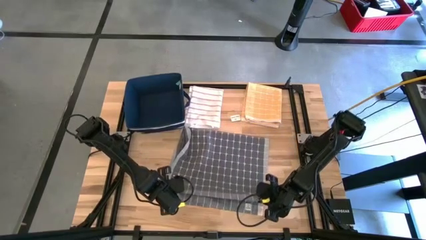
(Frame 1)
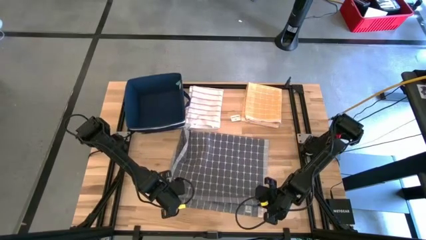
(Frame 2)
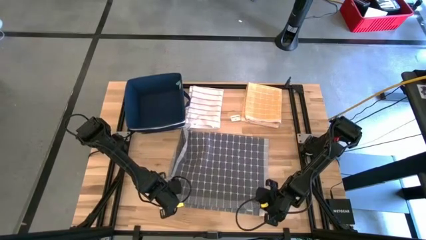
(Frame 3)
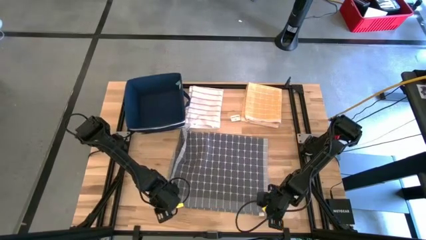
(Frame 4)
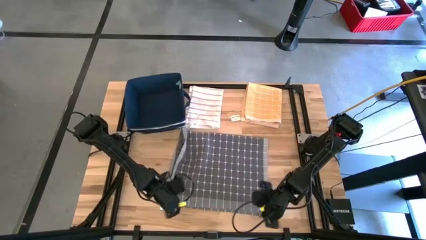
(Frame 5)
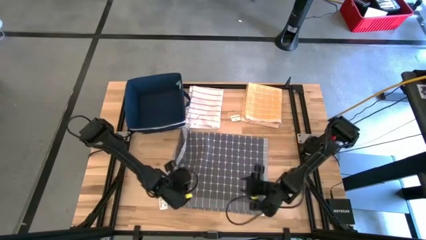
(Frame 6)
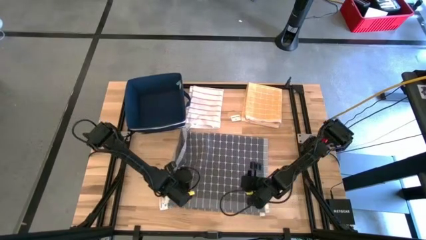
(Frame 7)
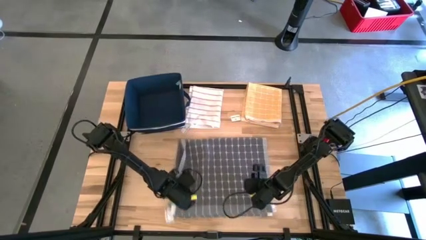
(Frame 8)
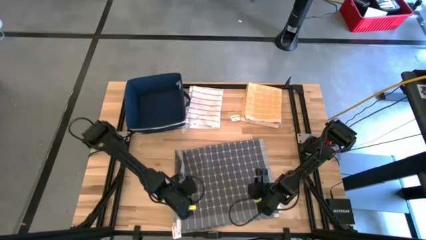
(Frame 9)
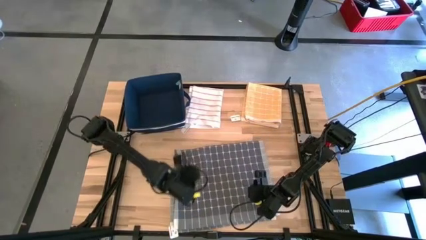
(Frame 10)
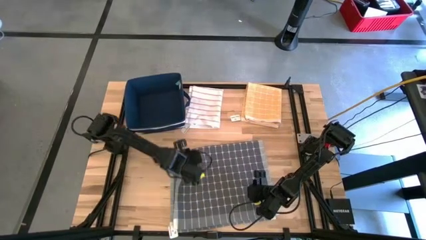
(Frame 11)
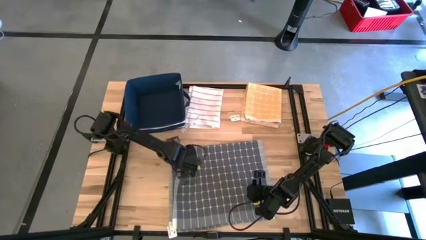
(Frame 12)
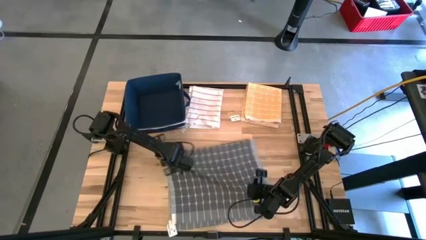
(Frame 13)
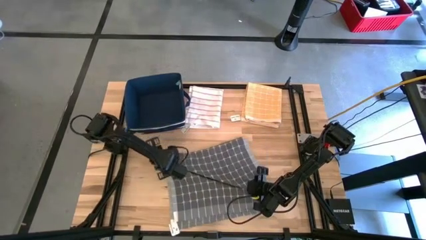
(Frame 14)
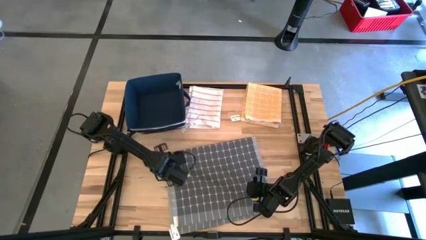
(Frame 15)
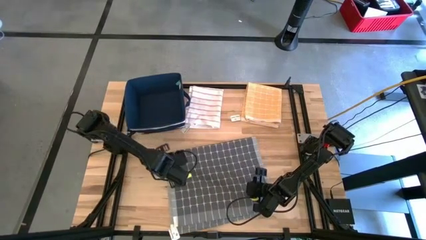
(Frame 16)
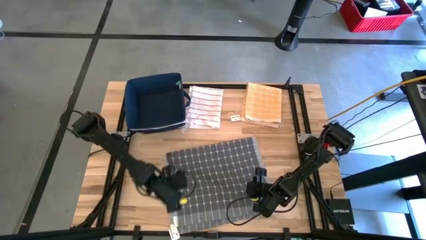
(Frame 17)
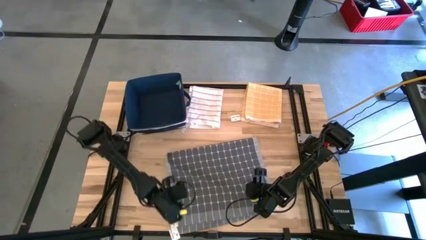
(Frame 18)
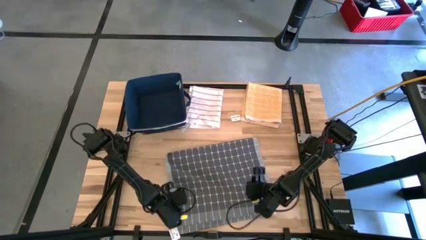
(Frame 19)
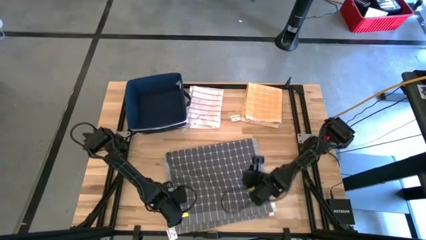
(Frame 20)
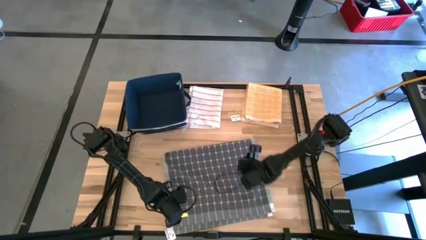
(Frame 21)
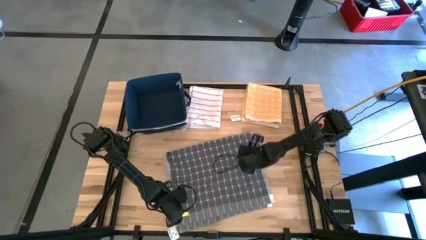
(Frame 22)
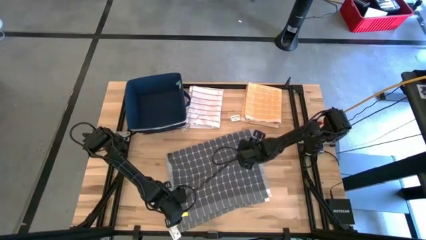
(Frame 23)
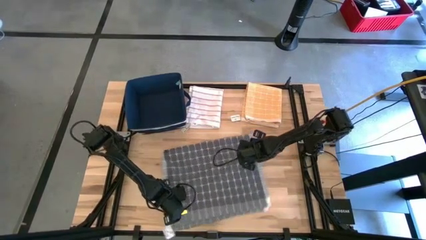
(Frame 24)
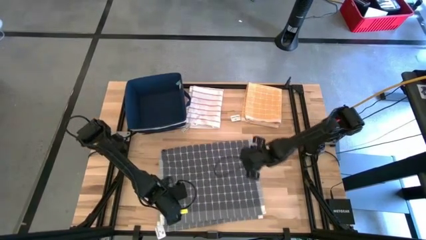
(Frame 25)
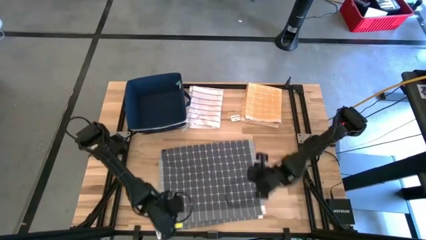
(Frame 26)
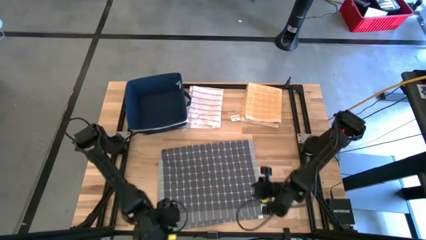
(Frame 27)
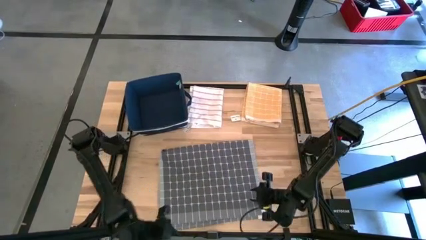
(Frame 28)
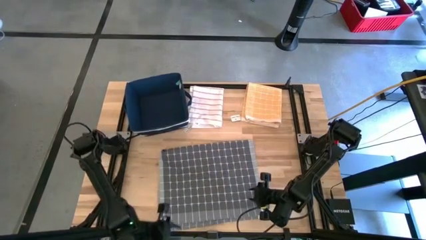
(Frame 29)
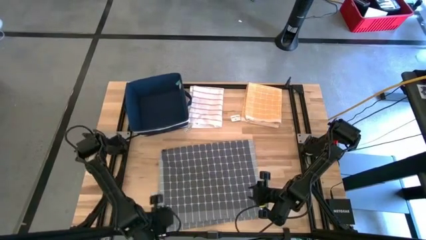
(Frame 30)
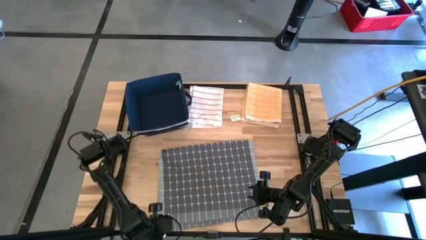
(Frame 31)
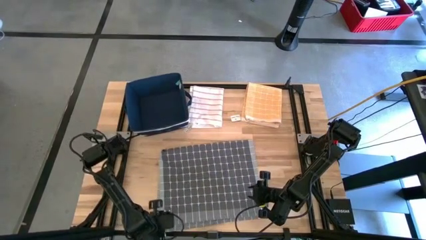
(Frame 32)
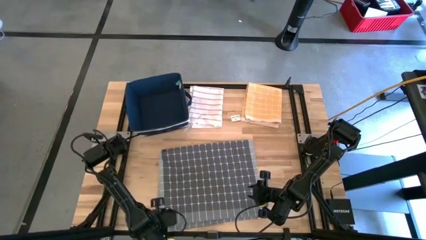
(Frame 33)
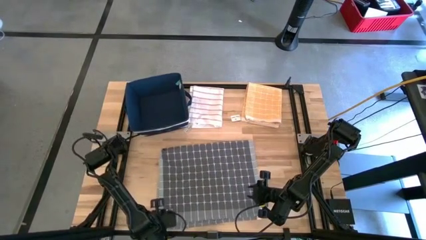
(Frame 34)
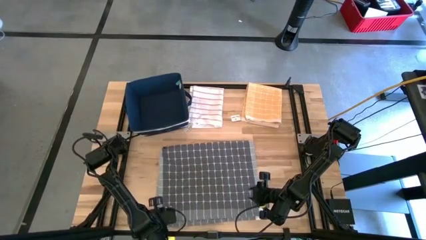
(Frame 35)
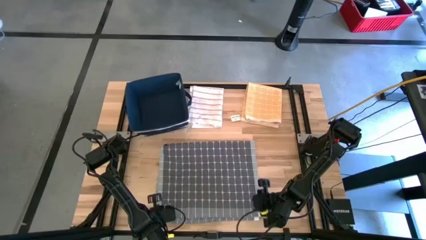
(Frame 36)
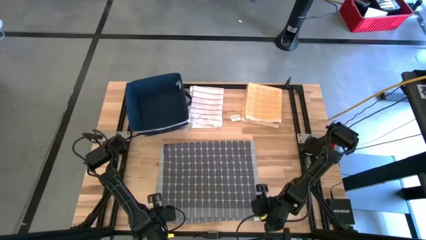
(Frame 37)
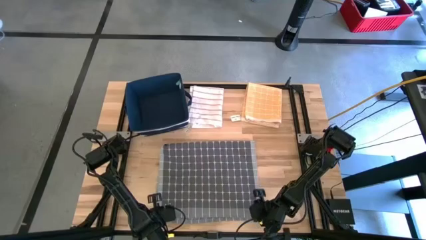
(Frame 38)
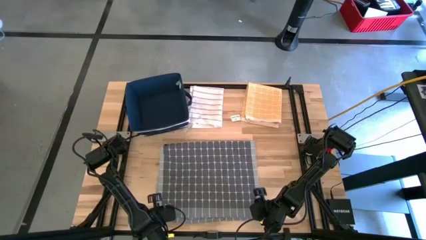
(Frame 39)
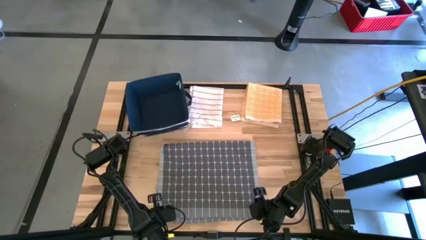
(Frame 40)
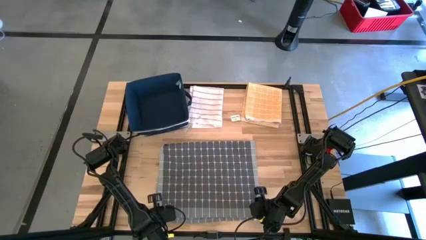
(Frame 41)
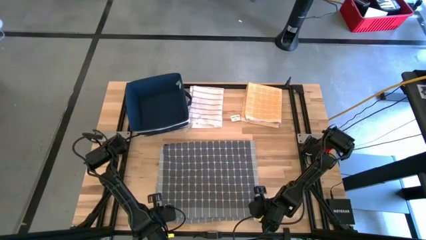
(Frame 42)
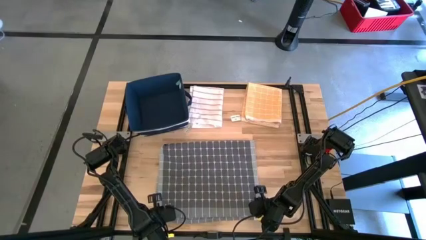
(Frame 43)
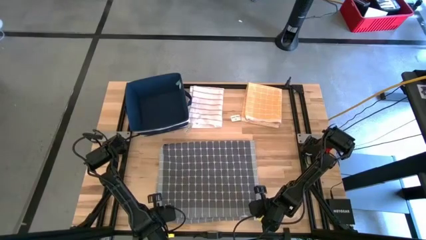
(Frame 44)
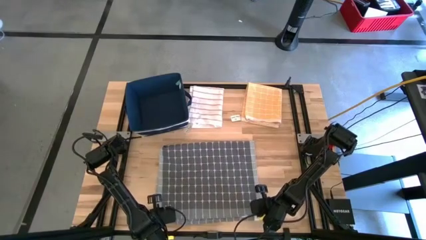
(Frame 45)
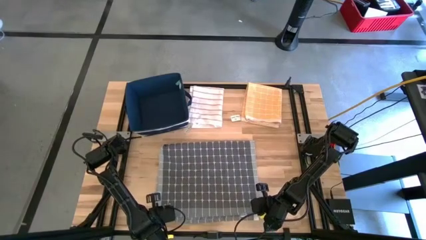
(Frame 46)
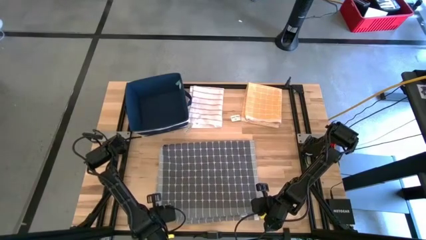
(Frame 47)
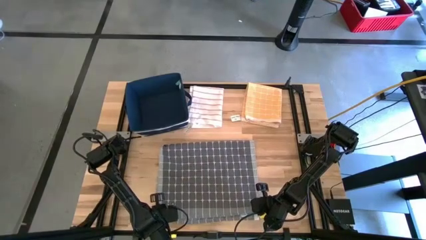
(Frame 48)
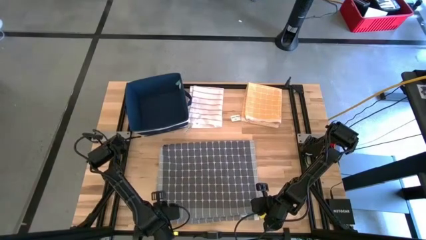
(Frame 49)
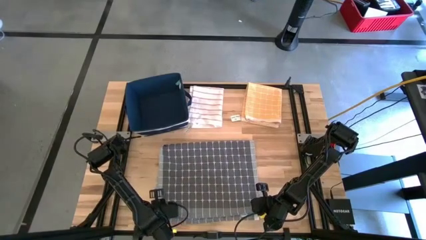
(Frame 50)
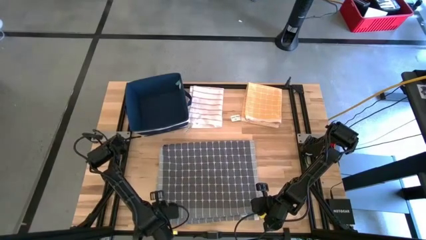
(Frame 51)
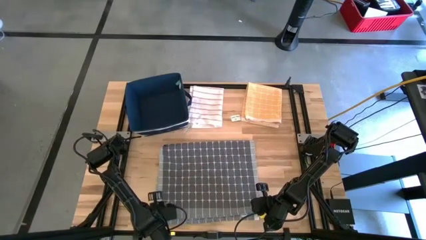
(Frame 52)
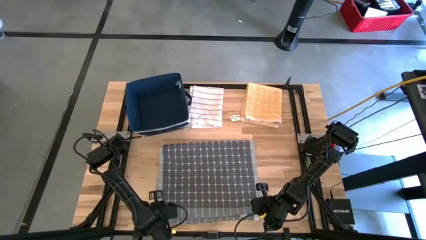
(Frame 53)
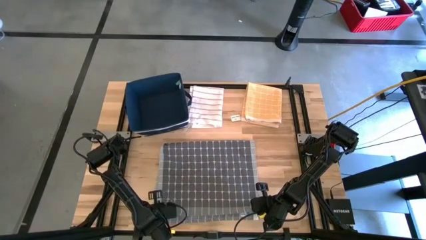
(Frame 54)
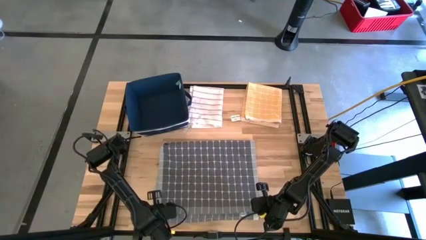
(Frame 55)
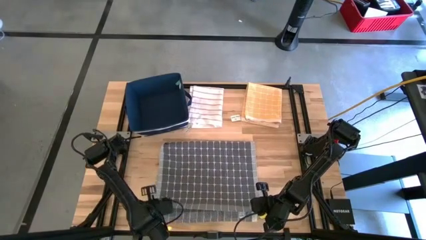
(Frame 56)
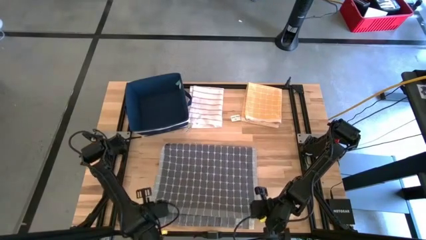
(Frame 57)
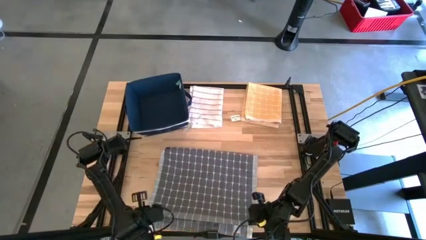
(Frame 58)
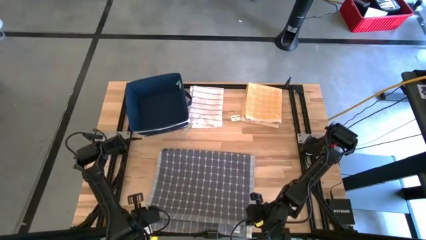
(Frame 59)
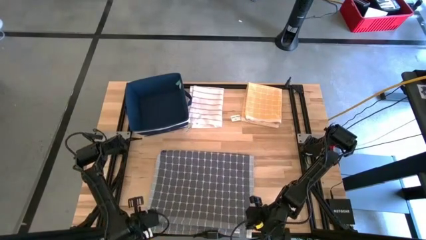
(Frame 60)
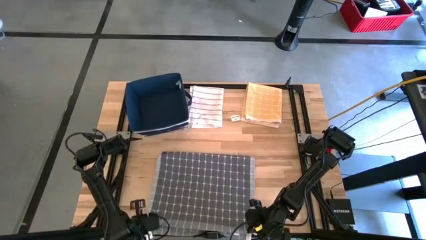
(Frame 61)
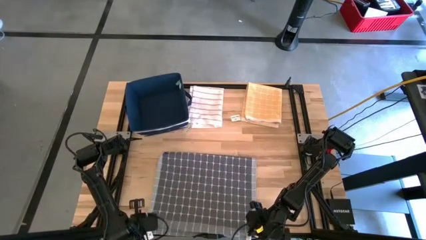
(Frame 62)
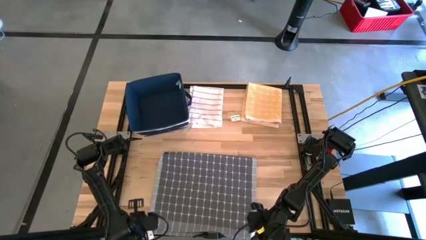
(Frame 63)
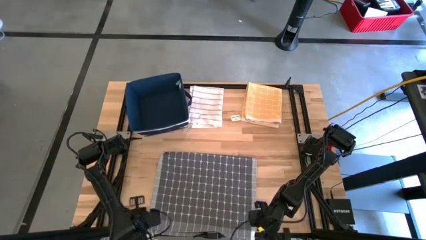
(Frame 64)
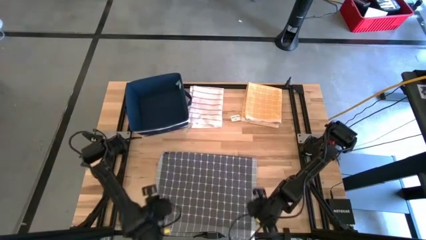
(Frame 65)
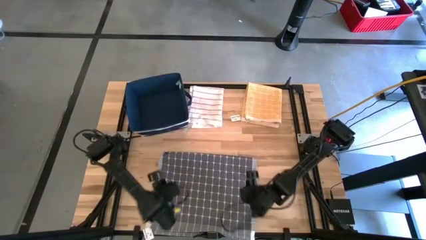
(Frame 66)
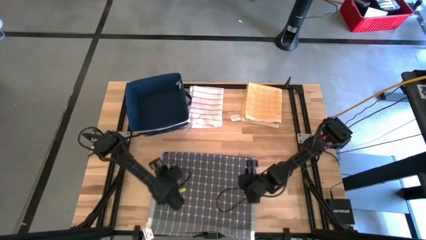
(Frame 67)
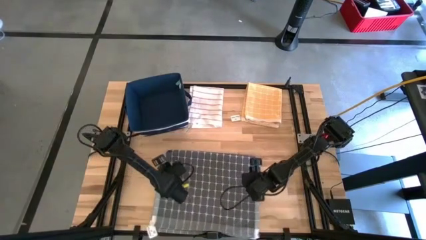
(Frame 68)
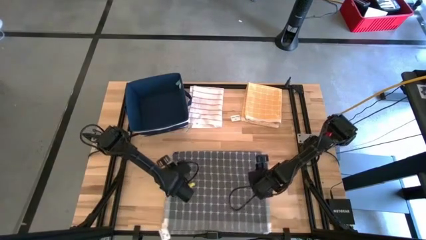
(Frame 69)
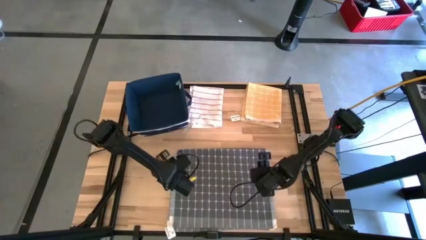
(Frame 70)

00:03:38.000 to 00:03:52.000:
Task: Fold towel
Fold the gray towel

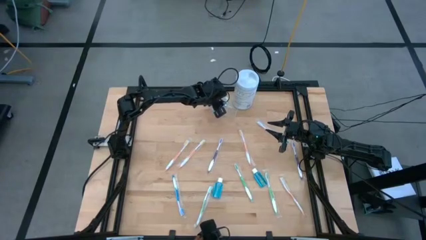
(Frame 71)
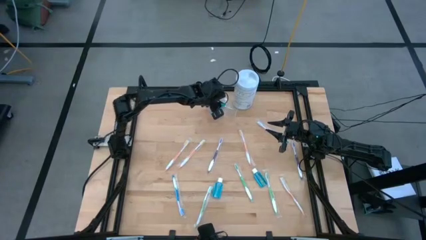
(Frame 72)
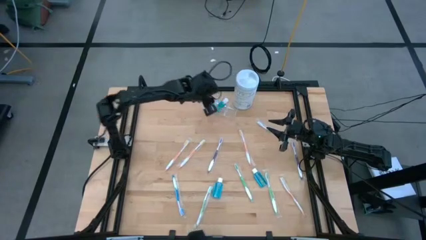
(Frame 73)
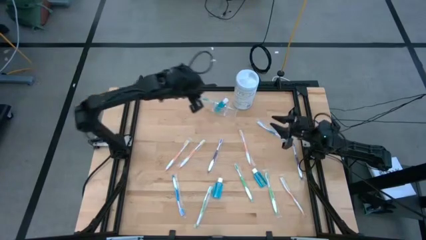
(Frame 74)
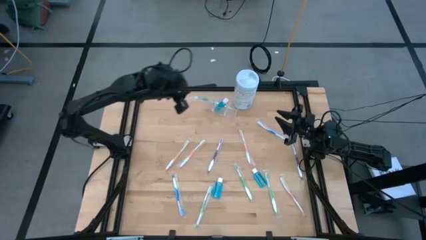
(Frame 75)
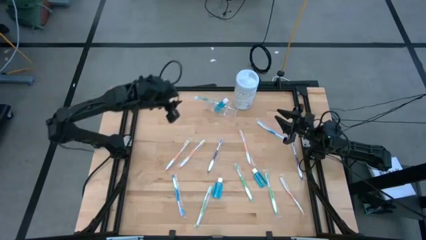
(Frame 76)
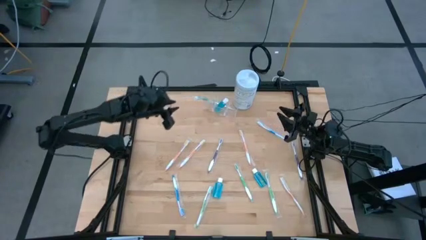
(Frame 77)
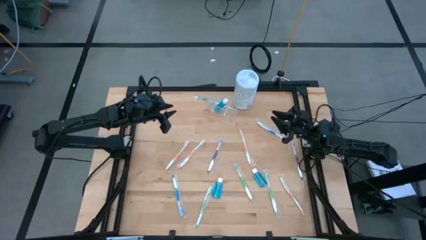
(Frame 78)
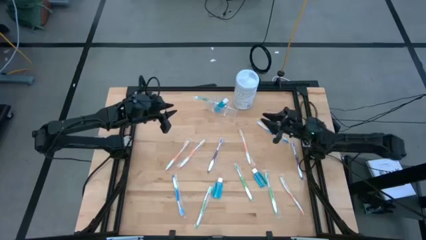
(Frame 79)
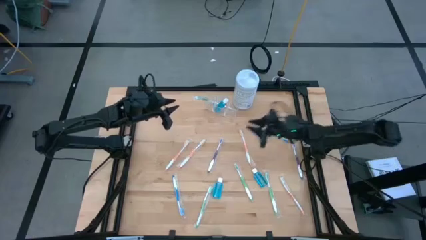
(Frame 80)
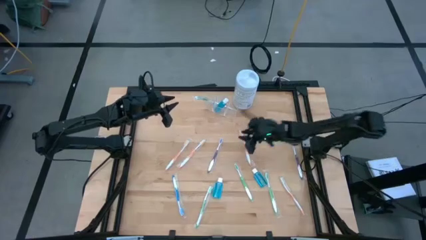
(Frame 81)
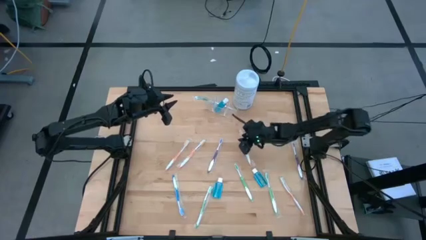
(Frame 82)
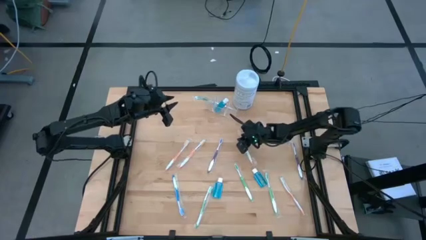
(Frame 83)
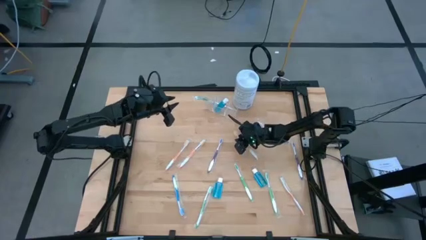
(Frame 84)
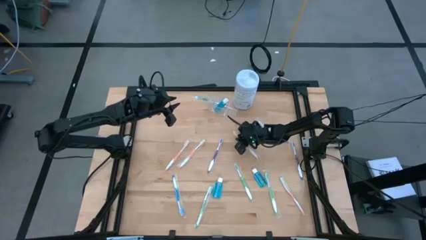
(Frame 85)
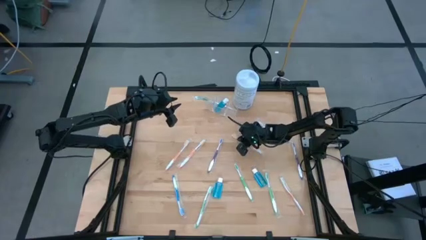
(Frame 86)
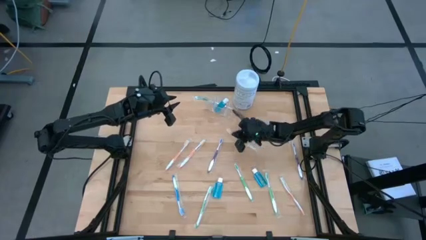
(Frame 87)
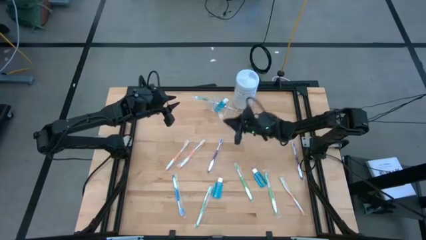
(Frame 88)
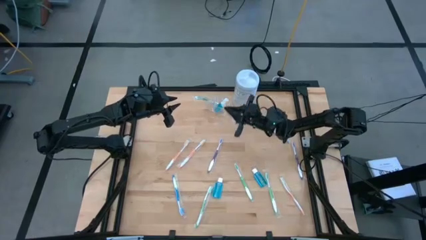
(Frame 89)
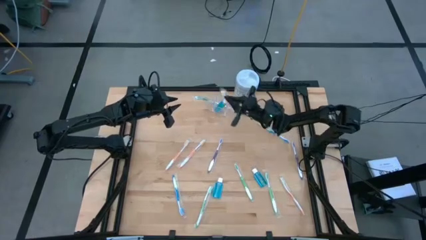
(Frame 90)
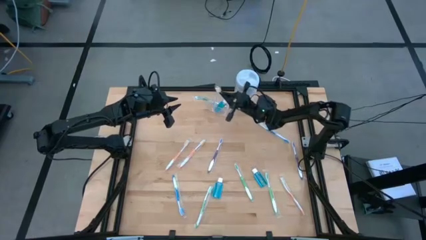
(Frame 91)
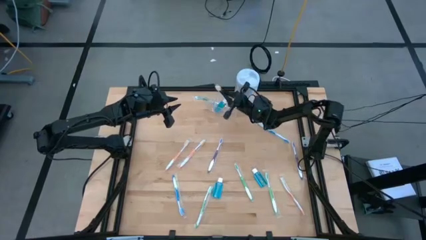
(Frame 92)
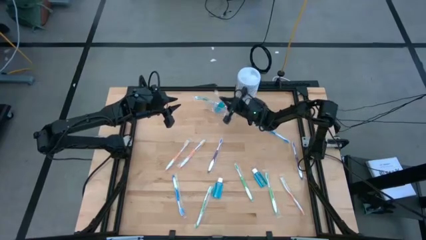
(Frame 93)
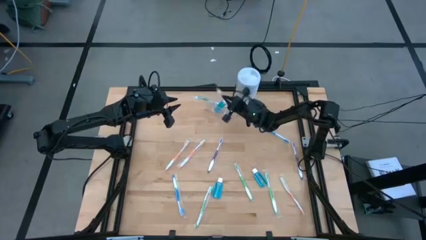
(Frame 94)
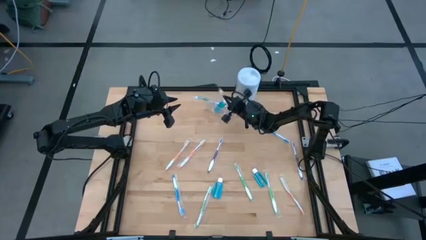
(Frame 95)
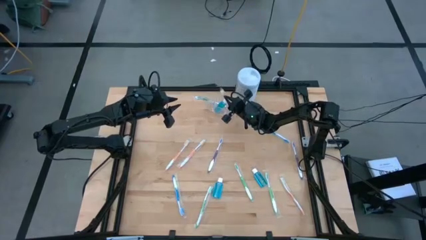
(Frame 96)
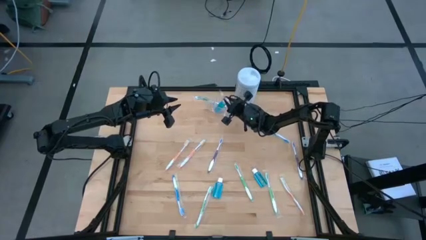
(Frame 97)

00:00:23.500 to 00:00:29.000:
Task: Pick & Place toothbrushing station
Put the orange toothbrush into the transparent organizer
